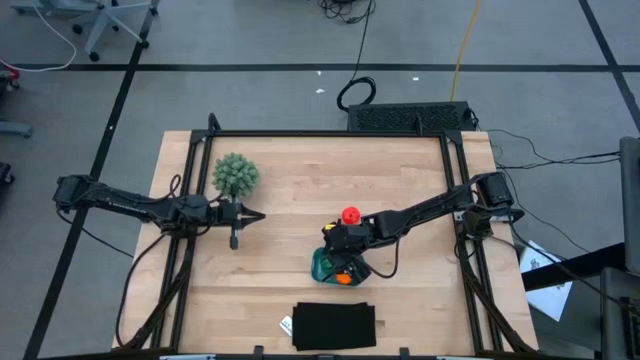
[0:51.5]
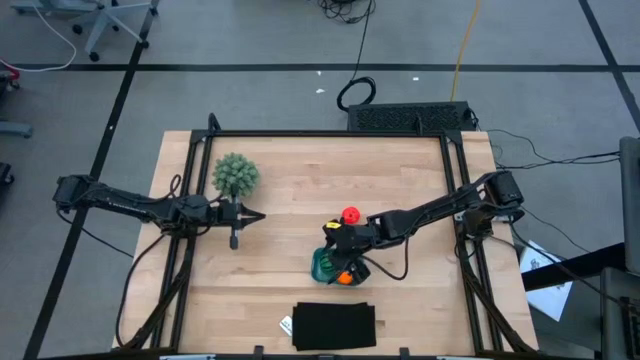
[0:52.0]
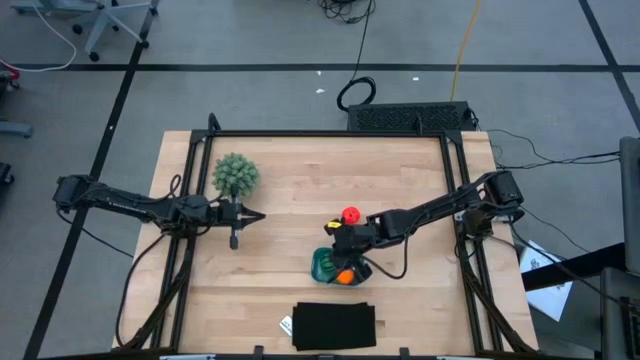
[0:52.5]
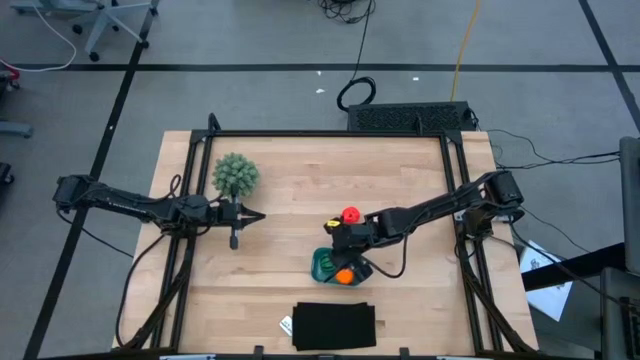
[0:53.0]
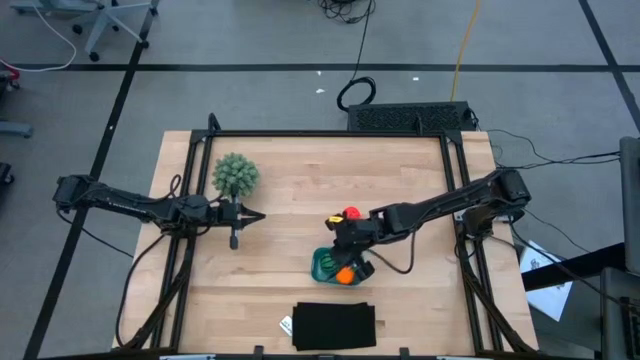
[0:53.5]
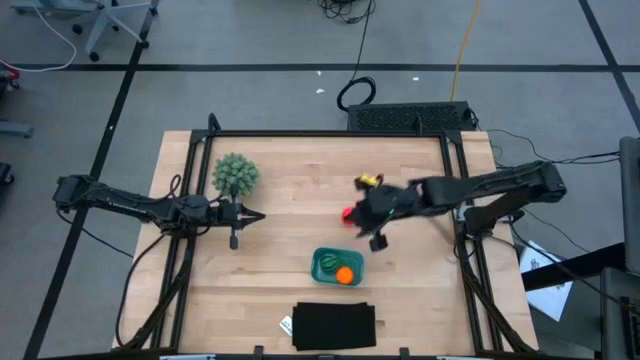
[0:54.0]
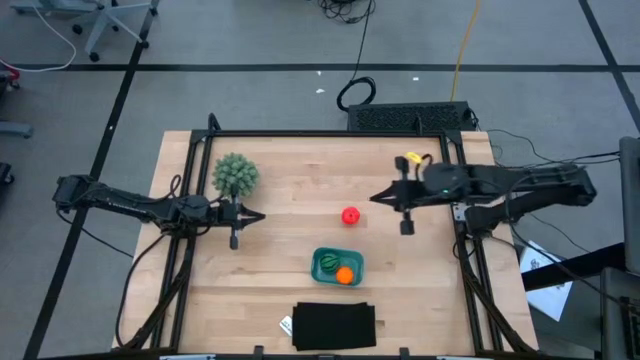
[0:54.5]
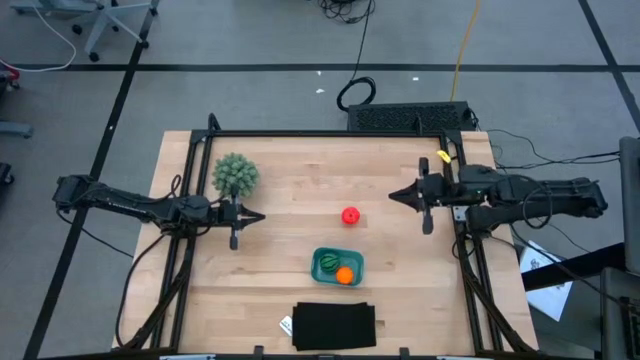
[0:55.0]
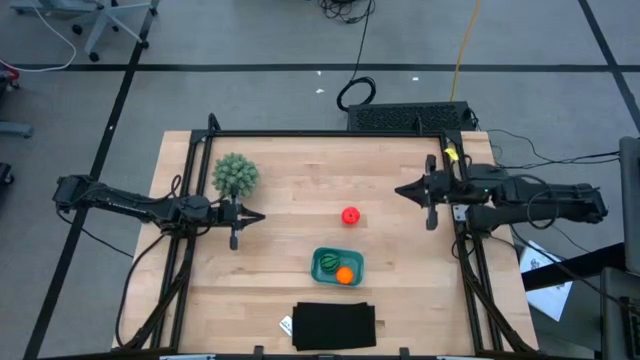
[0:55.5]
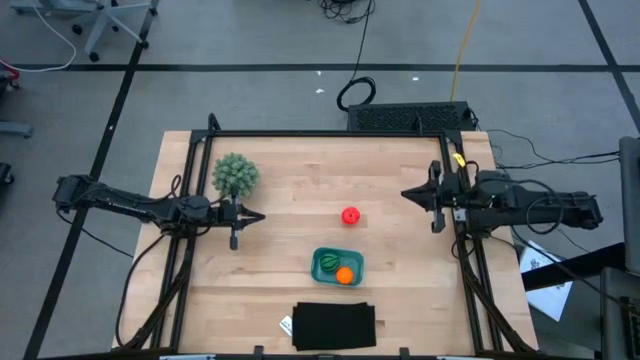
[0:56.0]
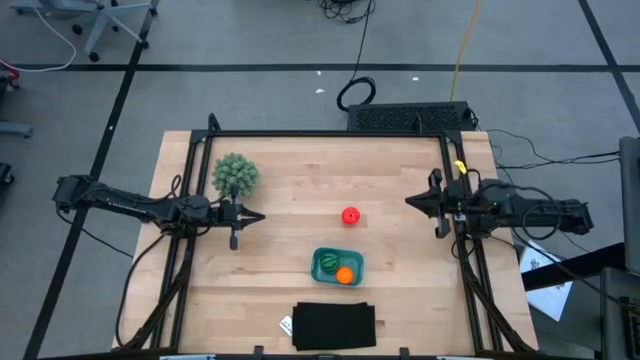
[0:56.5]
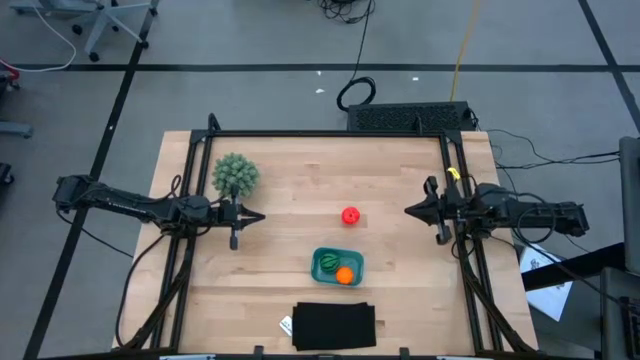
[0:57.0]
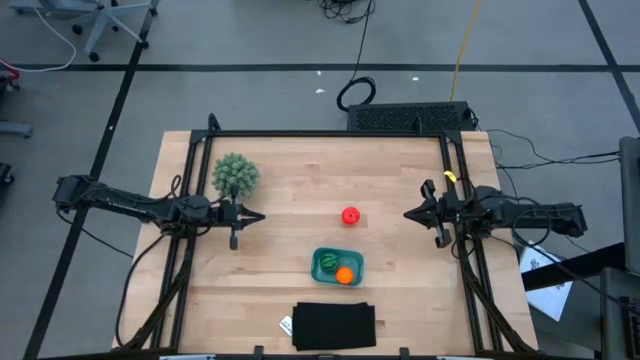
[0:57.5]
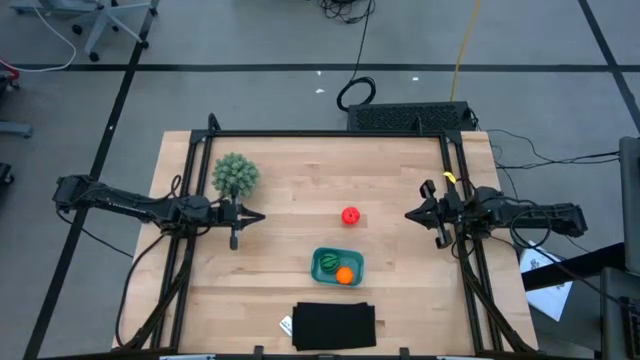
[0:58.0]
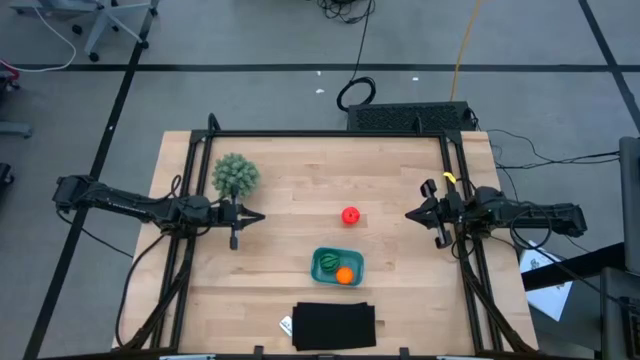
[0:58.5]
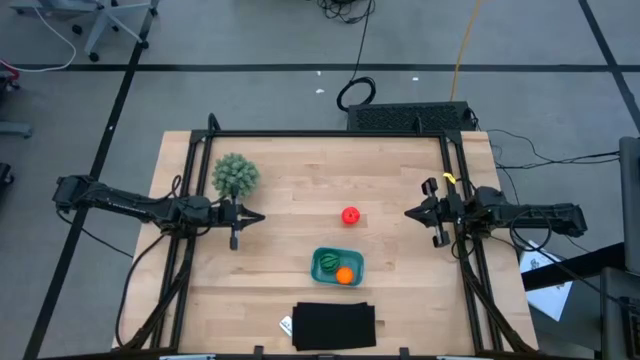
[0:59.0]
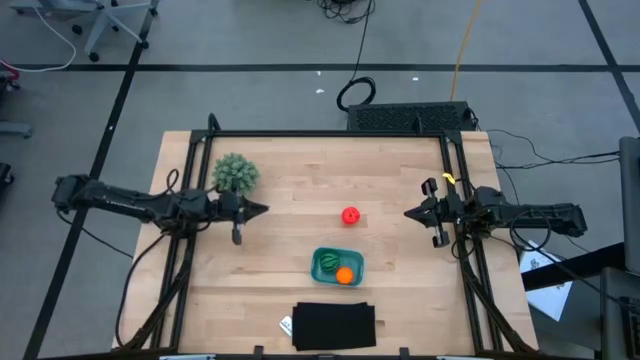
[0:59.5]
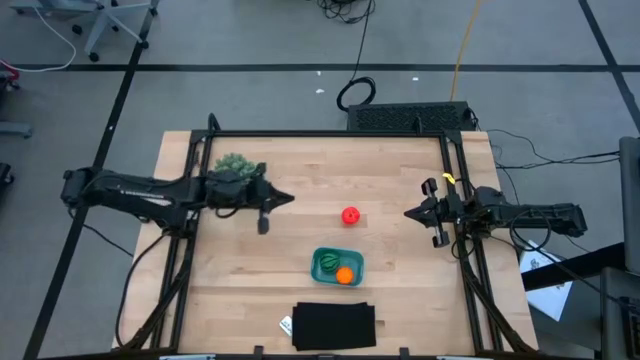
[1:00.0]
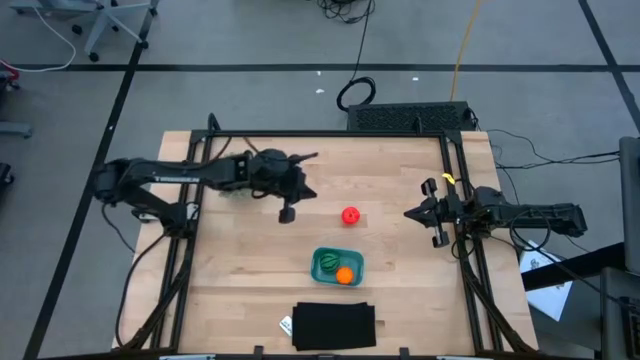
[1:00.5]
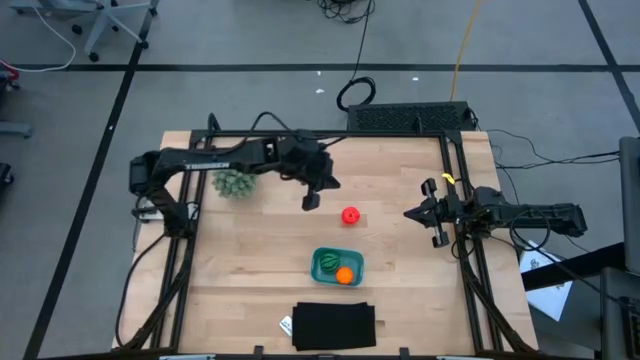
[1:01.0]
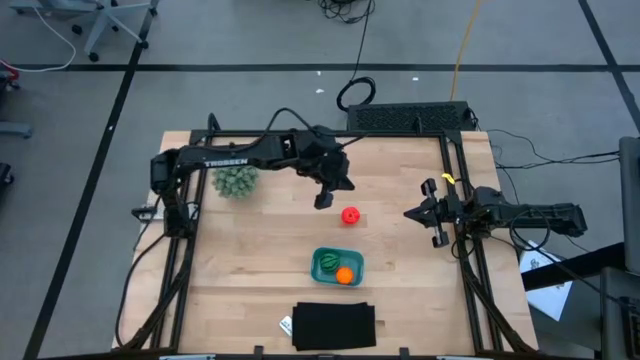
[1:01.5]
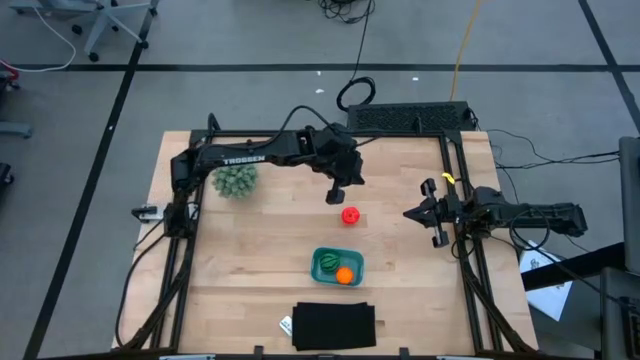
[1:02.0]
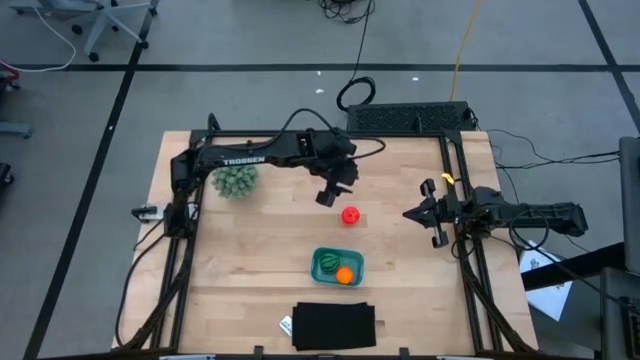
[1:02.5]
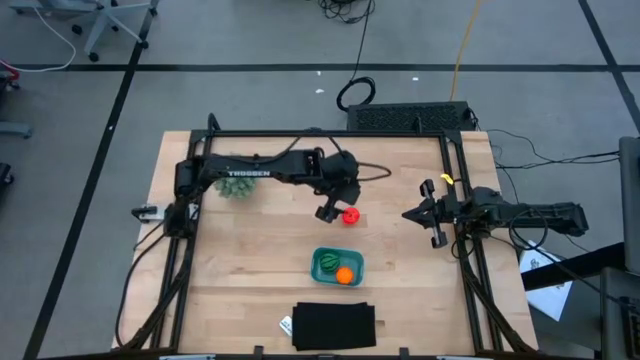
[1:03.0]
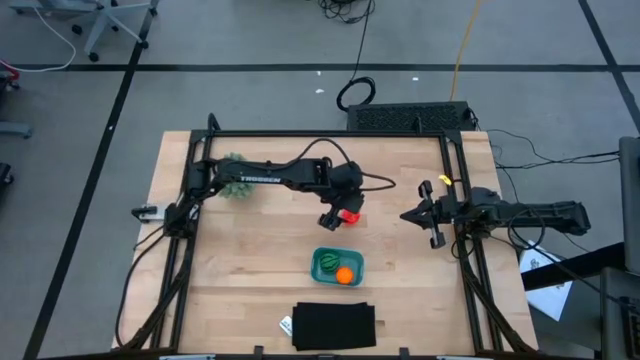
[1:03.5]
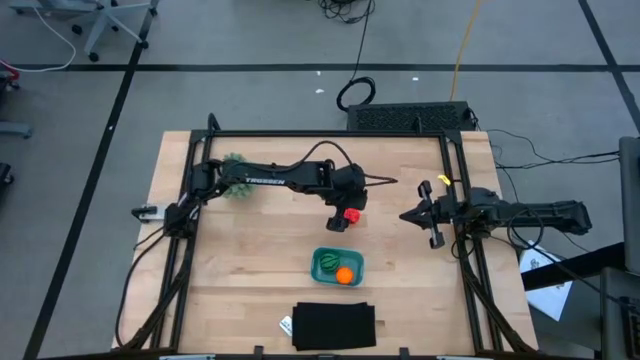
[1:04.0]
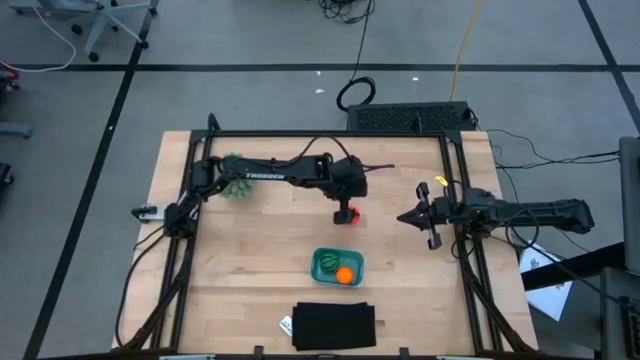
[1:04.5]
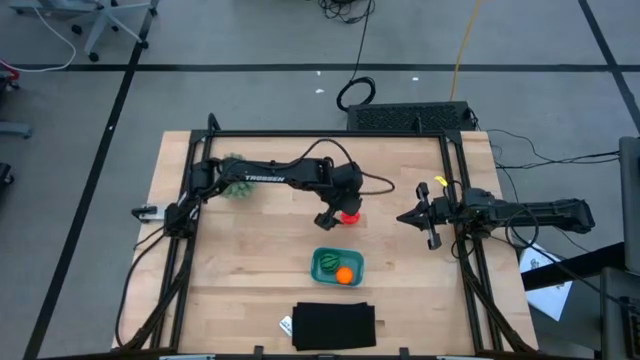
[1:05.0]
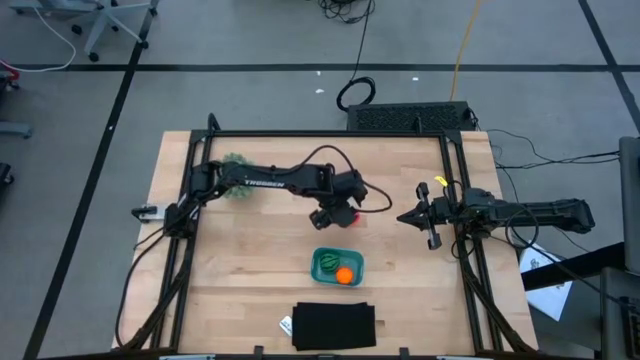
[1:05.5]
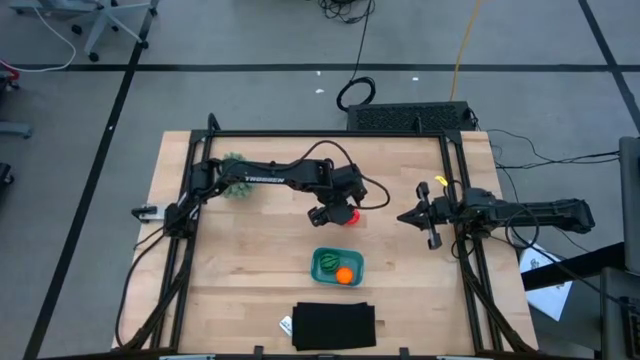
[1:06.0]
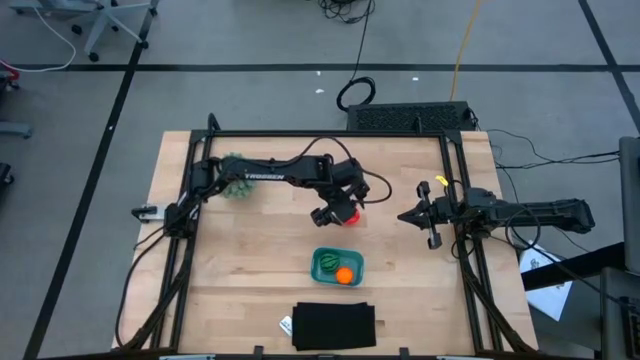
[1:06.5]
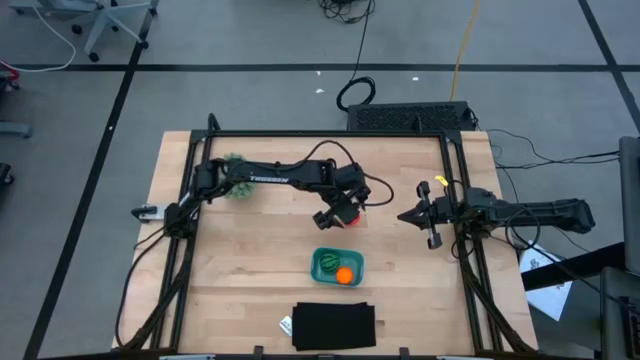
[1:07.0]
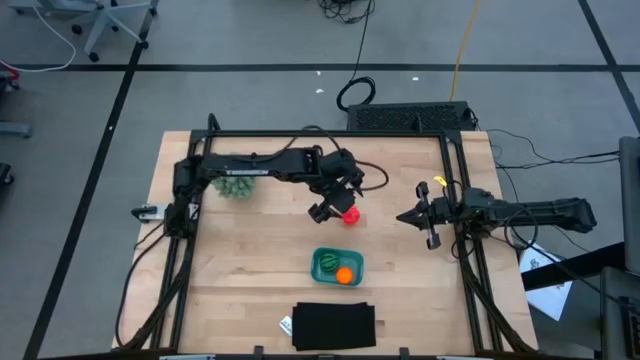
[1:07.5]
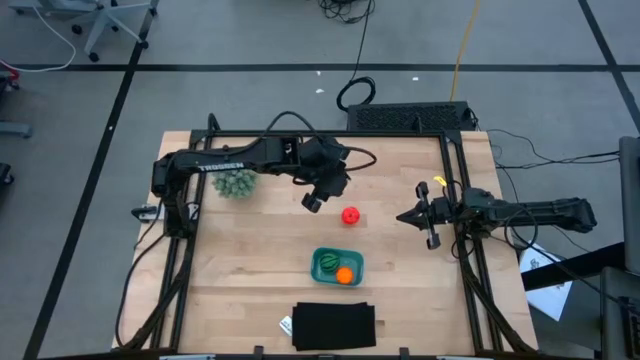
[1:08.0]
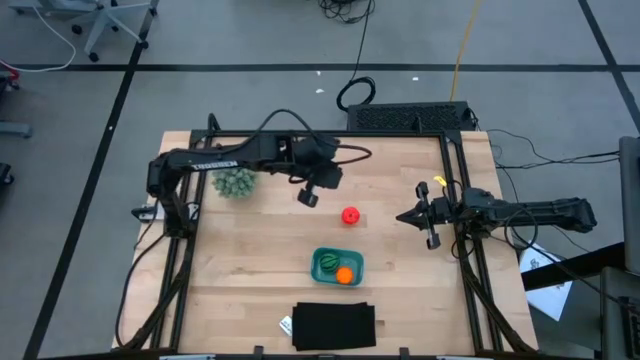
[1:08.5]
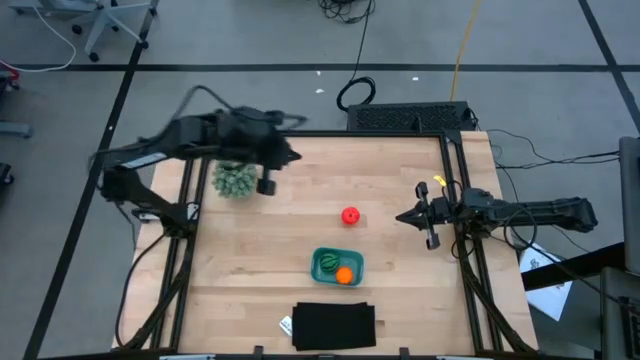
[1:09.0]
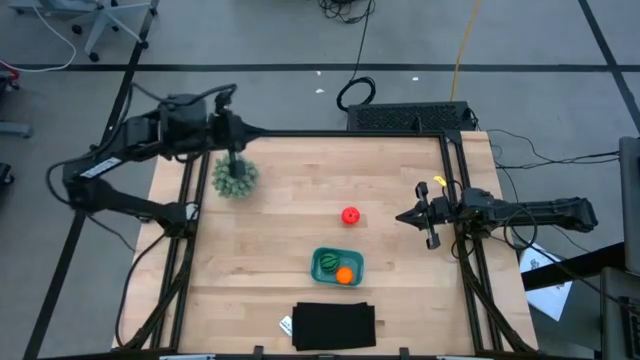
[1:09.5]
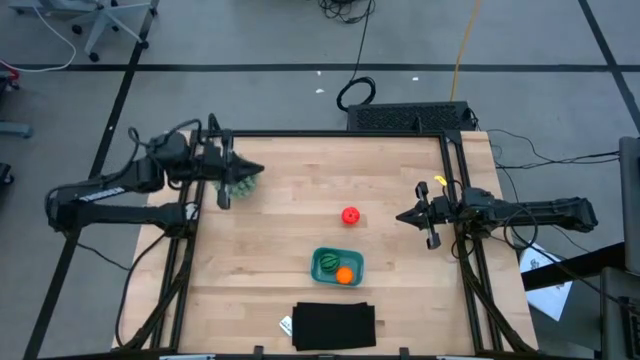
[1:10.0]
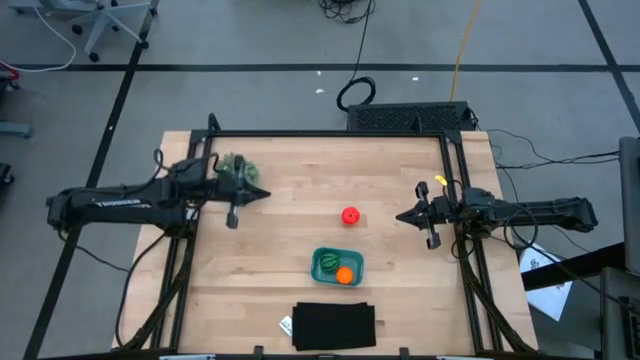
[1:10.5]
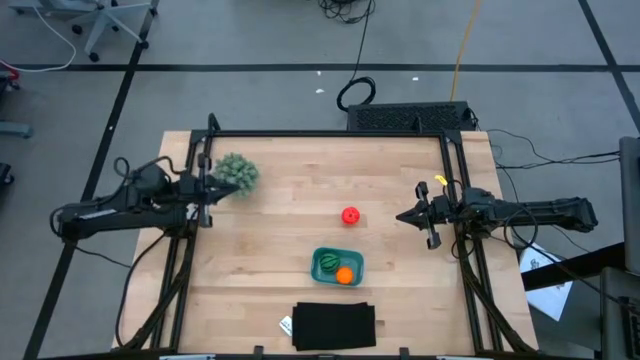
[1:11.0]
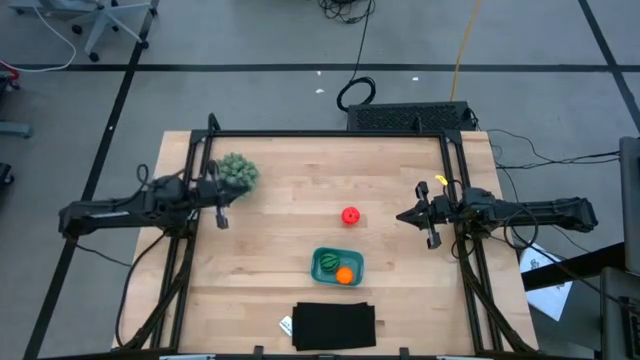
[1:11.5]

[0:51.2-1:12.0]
Task: Pick and placing Produce into tupperware
Put the apple in the blue bin
